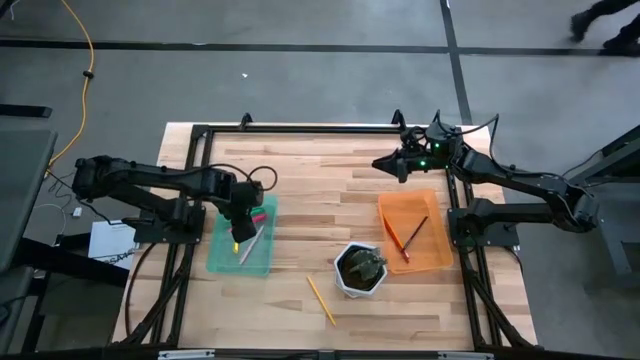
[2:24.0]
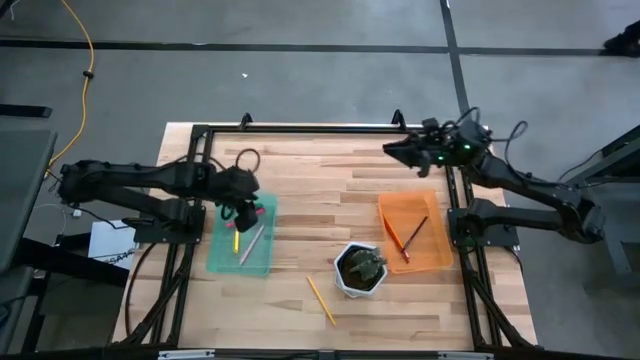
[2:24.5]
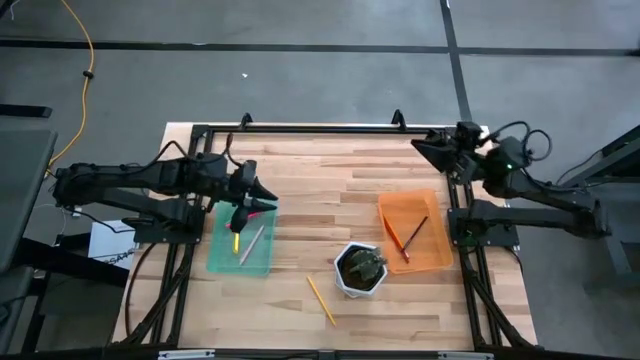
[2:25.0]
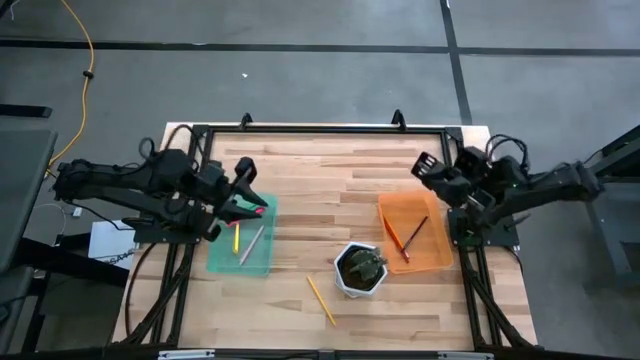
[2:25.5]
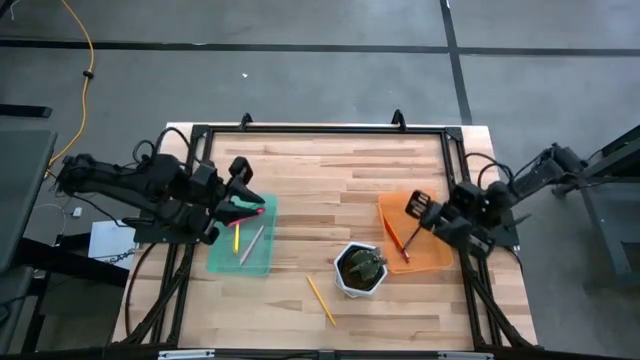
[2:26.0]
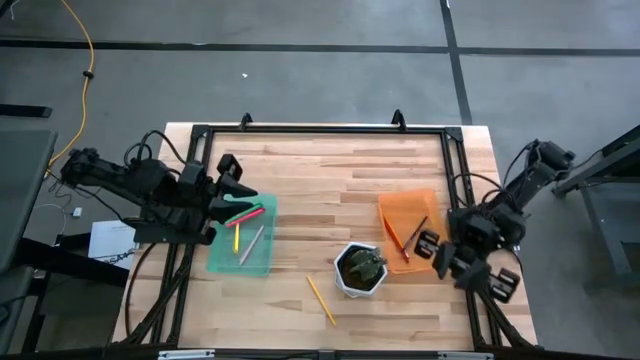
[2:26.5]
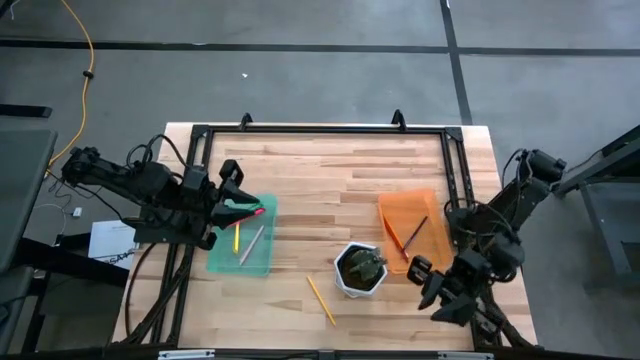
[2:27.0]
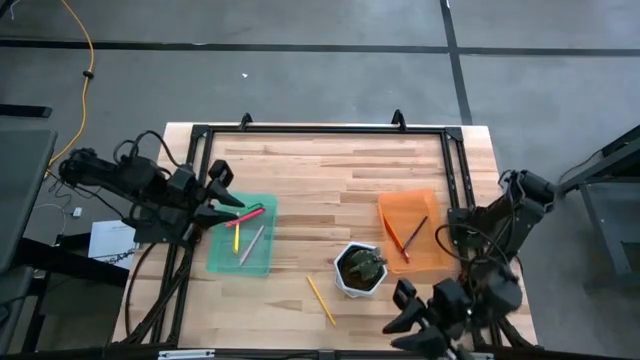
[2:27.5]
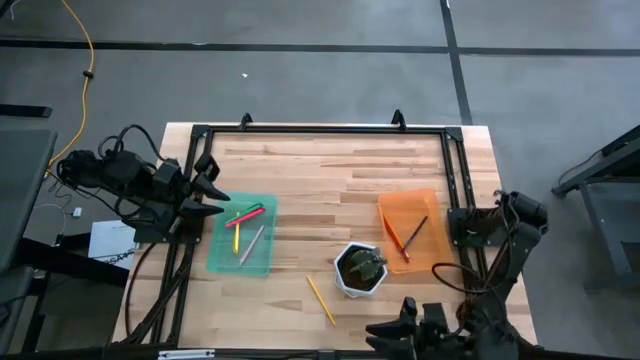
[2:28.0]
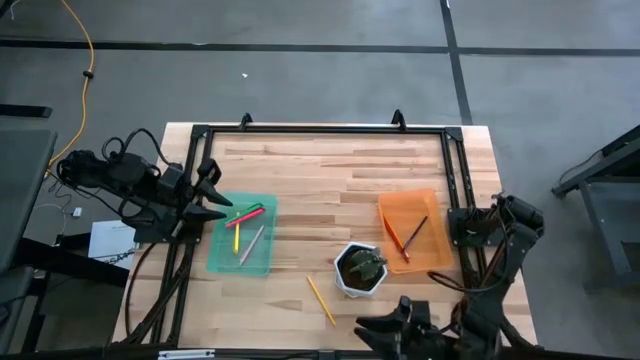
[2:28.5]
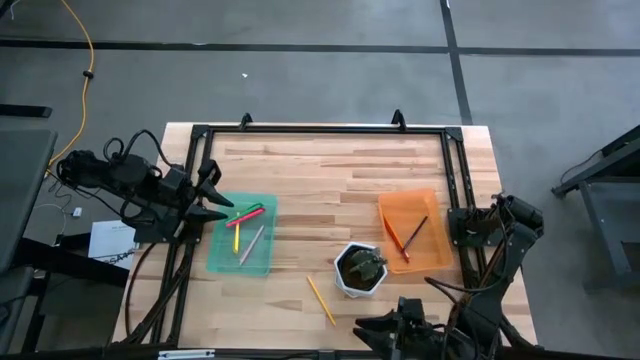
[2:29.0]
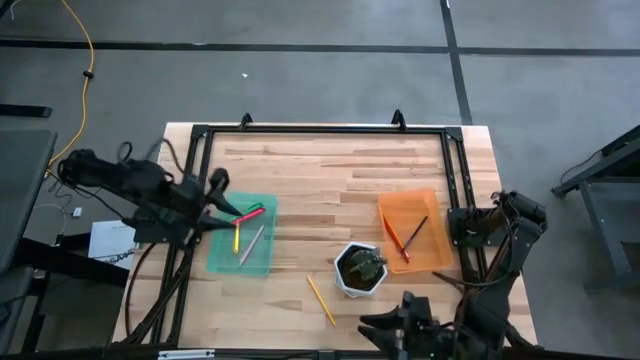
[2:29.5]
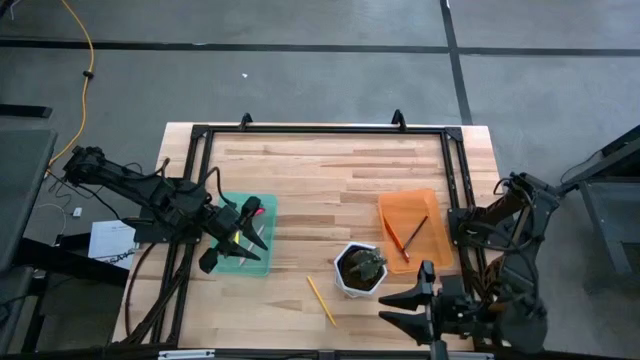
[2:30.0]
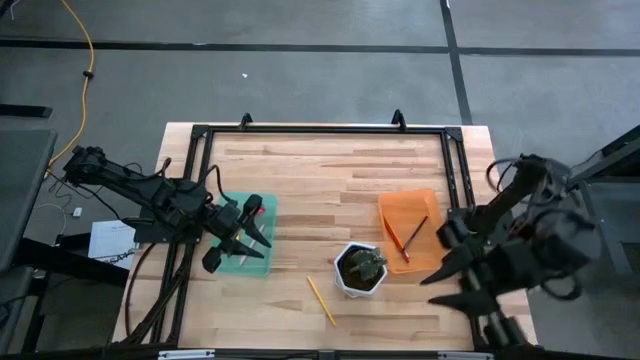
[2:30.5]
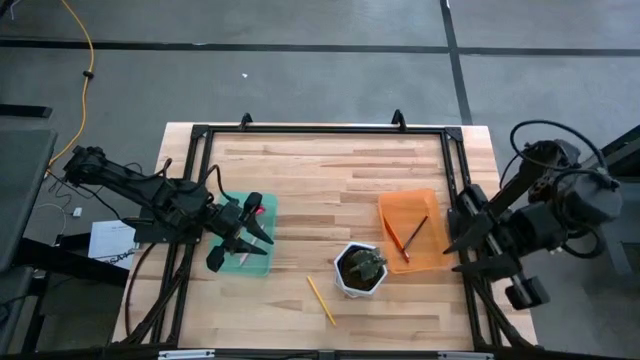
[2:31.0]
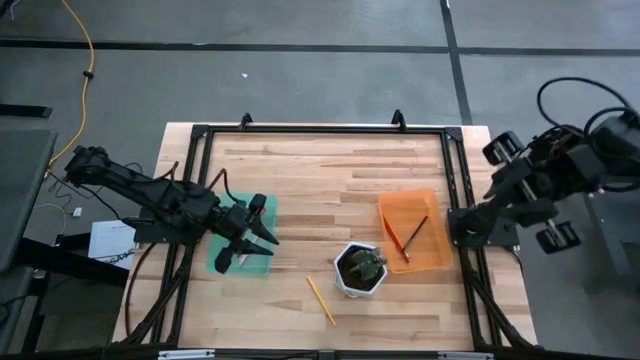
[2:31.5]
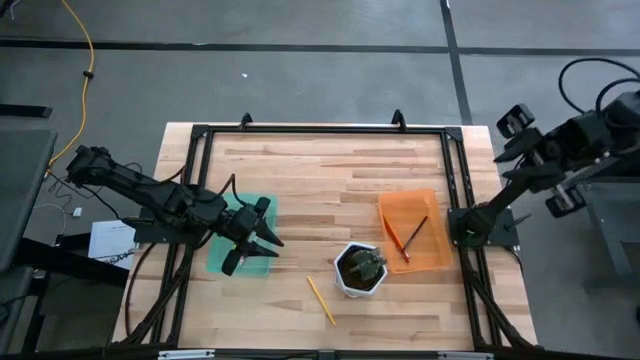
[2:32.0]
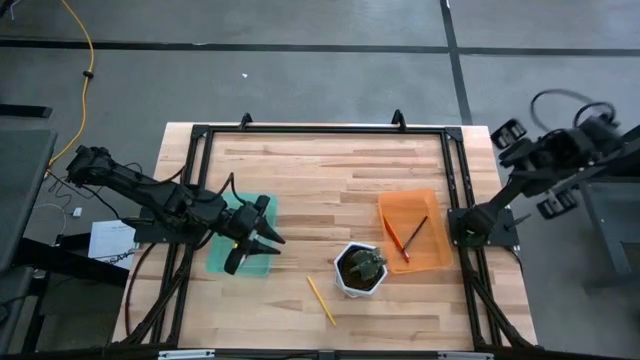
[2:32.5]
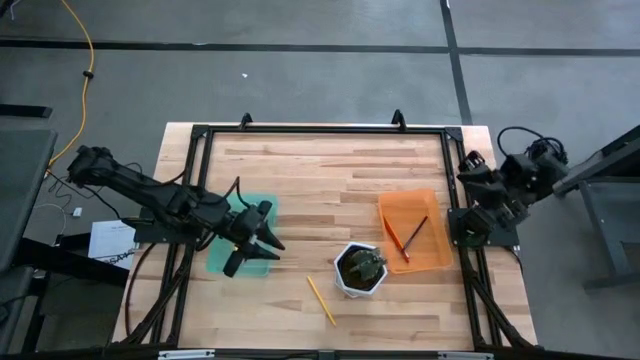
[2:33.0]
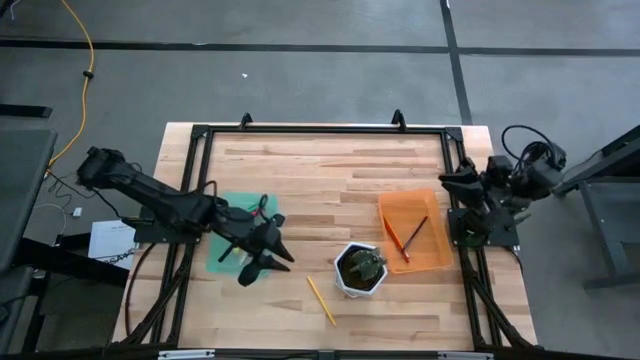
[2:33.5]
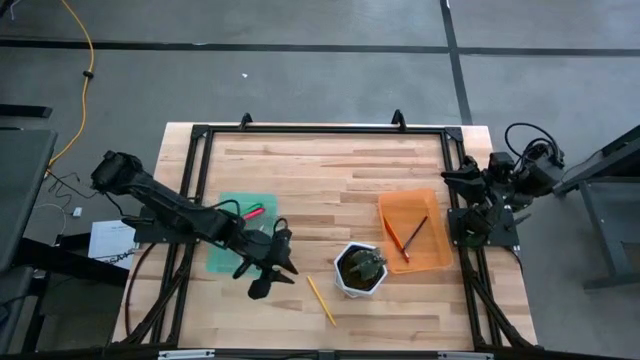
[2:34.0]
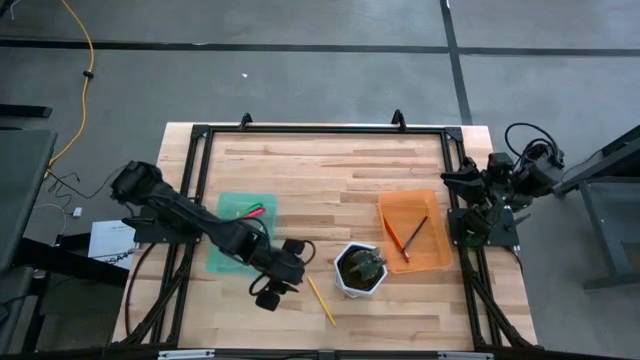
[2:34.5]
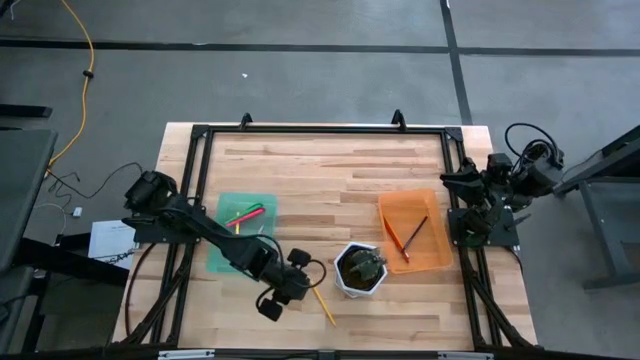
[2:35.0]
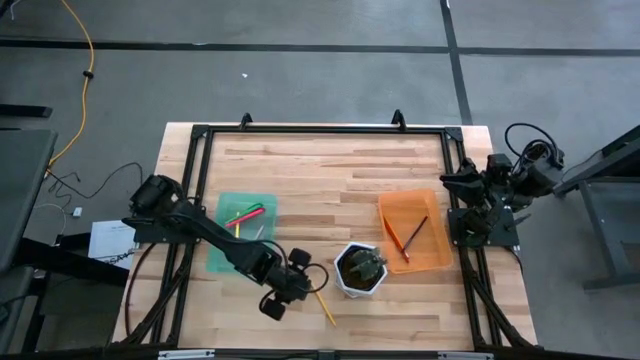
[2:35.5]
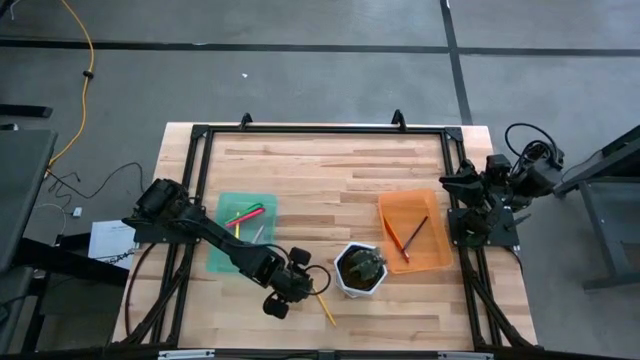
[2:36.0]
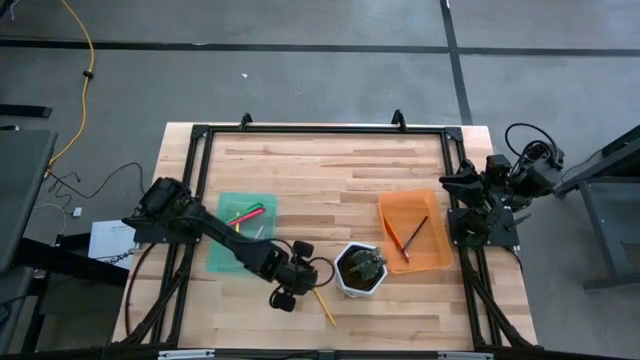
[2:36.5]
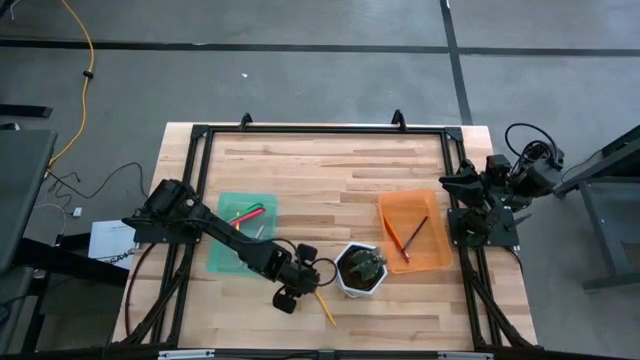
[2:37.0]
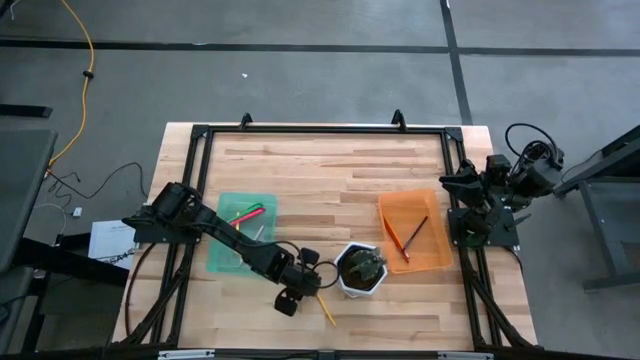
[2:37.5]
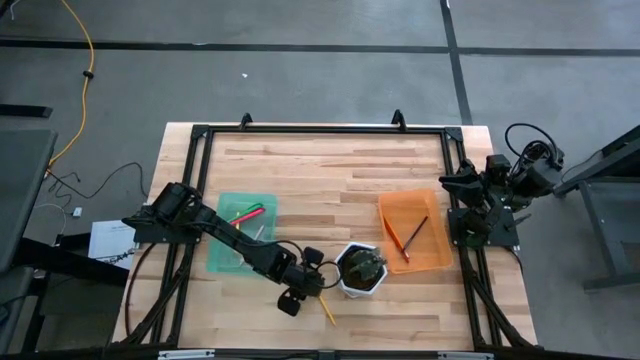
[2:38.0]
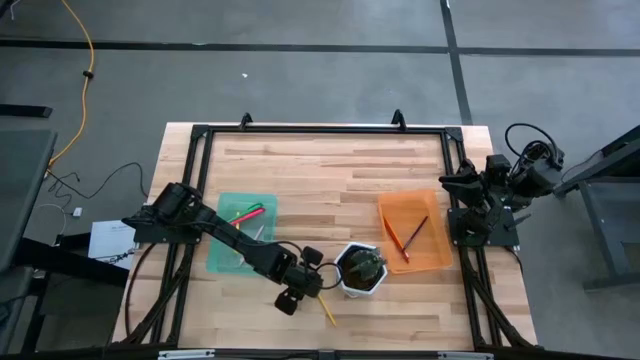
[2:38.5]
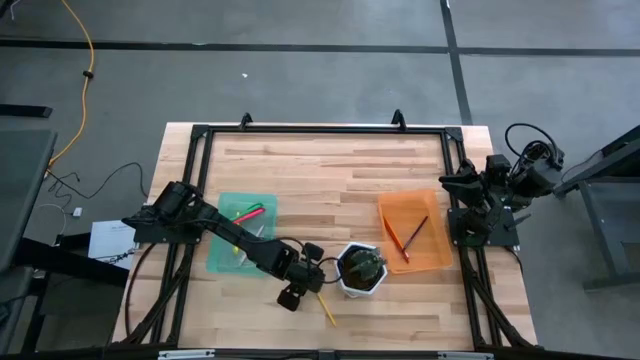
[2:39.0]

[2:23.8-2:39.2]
Task: Sort pens & pencils
Put the yellow pencil into the orange bin

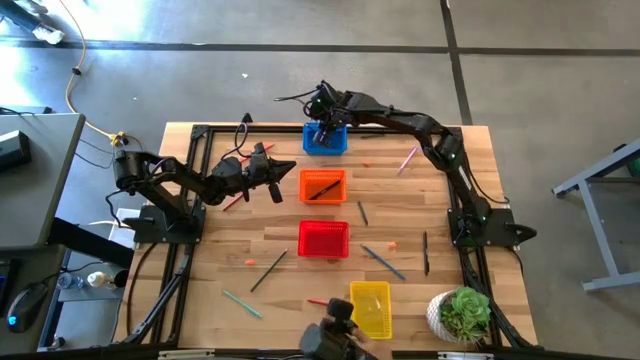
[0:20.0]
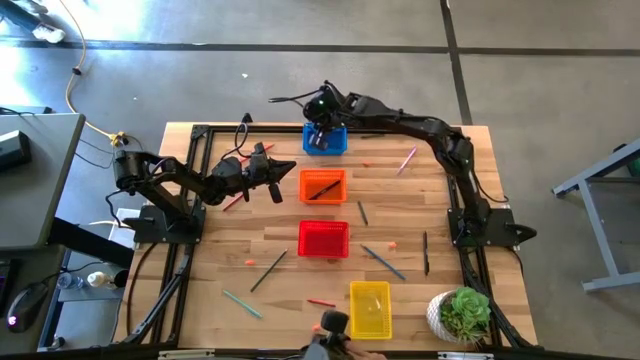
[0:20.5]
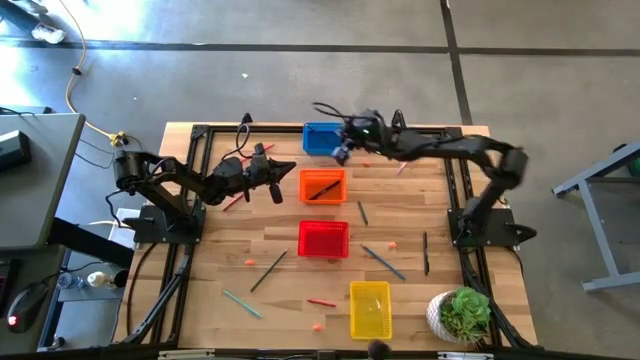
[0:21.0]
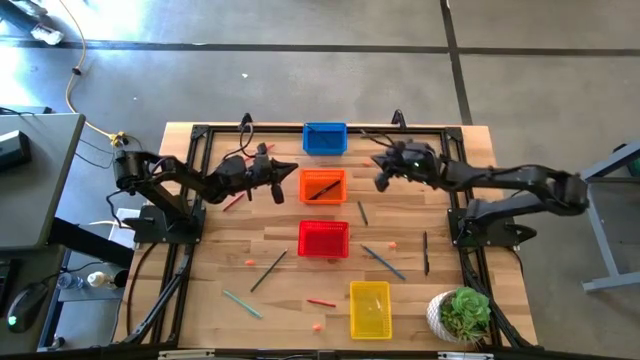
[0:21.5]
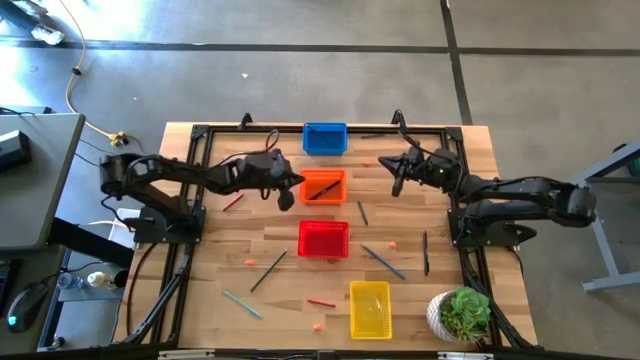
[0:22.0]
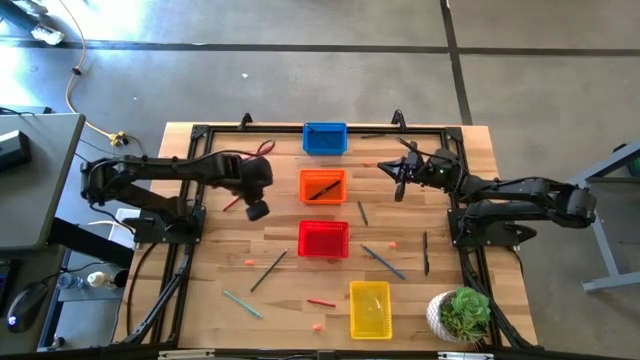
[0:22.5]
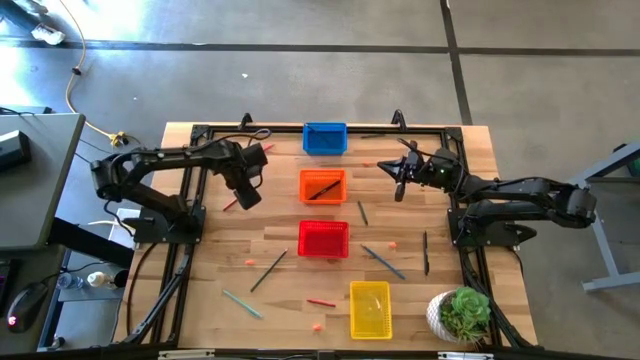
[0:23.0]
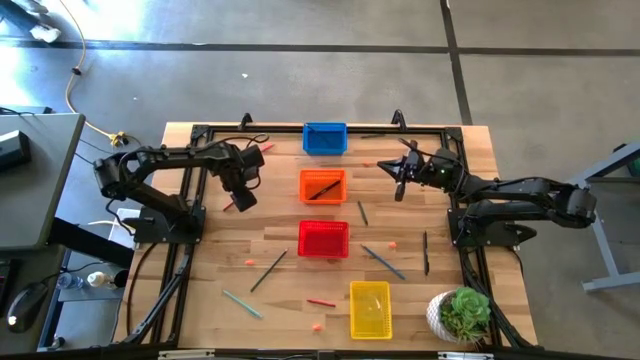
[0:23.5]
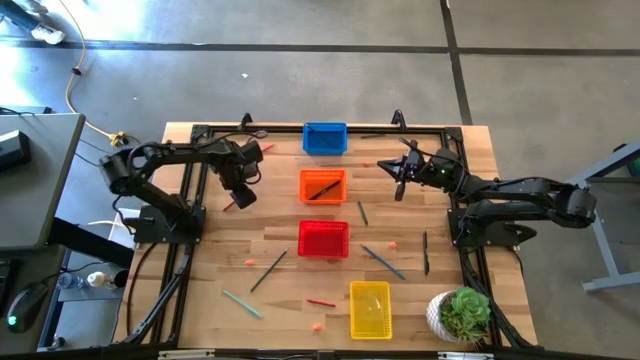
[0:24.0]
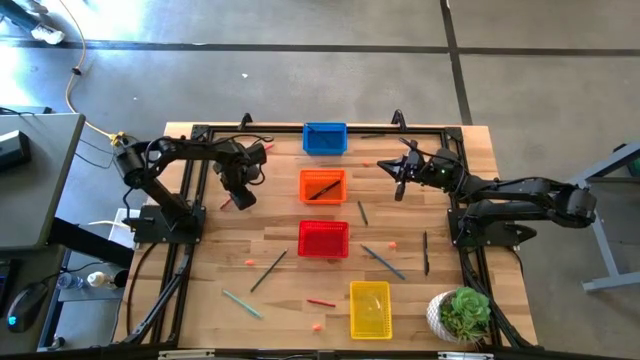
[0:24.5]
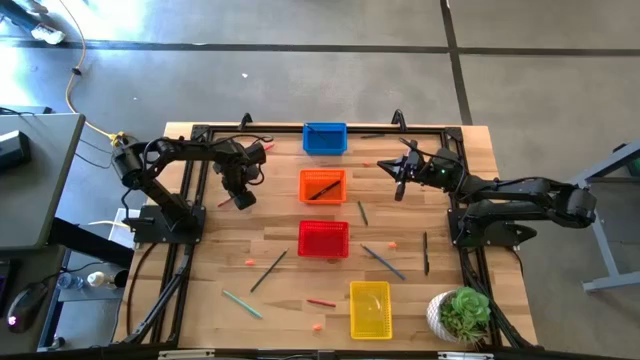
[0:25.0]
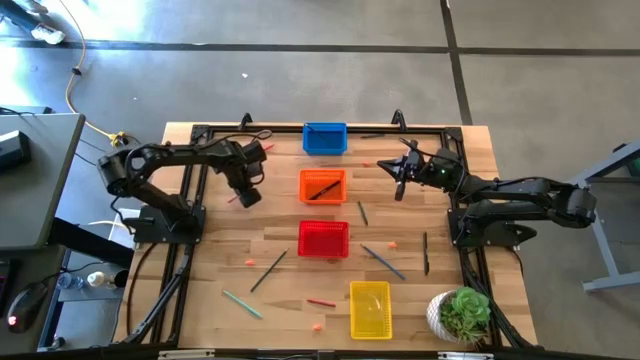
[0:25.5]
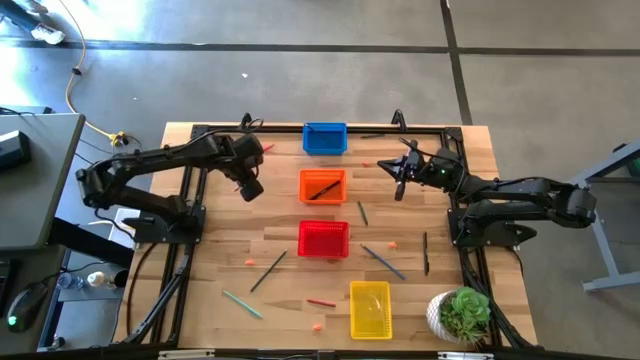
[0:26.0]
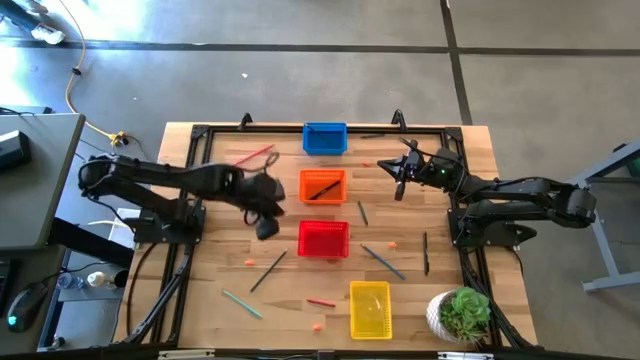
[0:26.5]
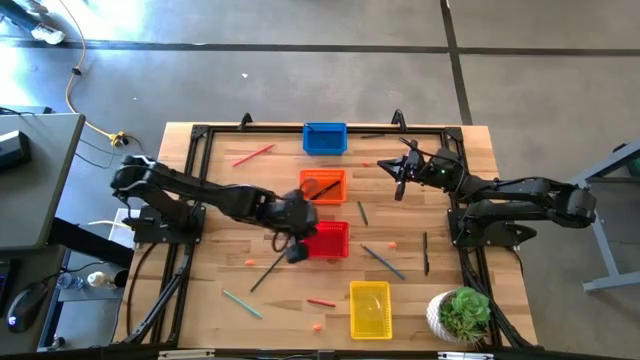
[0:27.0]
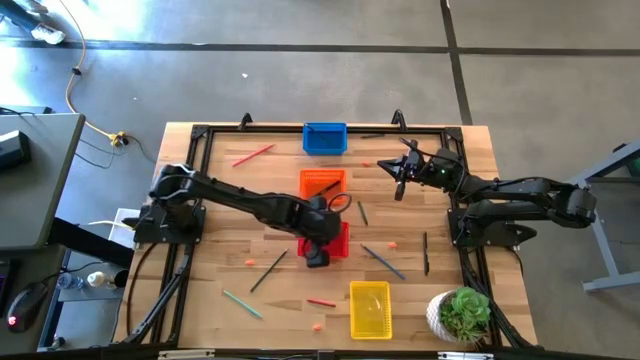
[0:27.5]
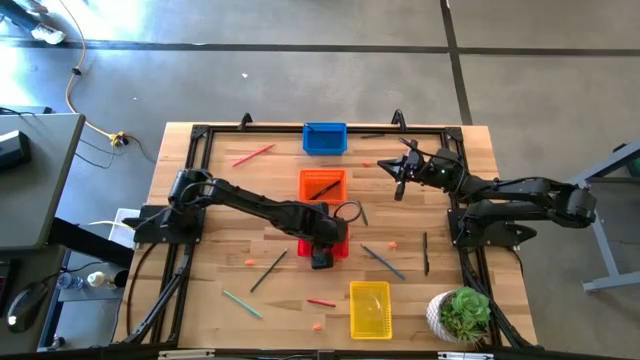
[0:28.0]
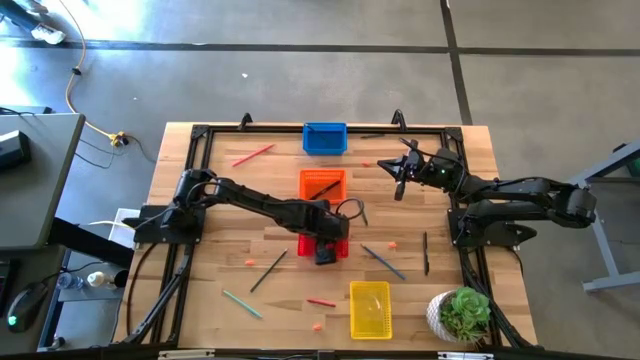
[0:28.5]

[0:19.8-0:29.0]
Task: Sort crayons/erasers/pens/pencils in bins
Put the red crayon into the red bin
